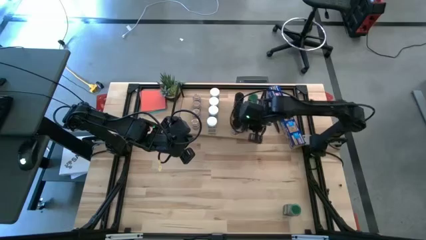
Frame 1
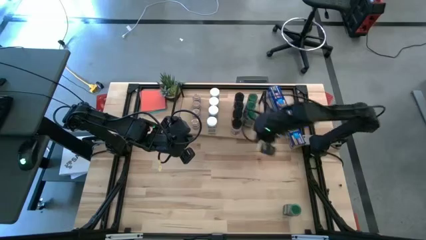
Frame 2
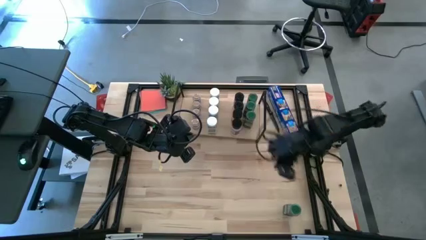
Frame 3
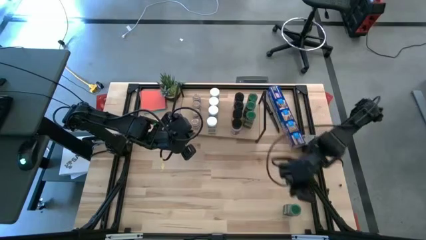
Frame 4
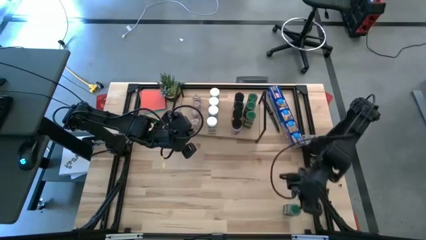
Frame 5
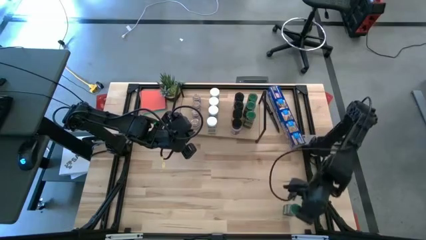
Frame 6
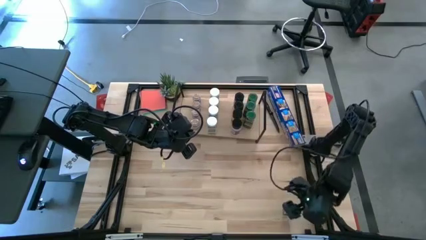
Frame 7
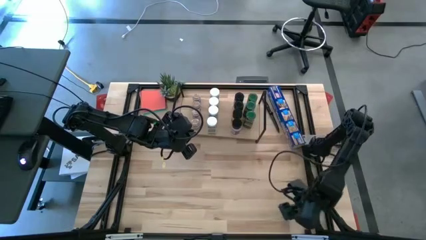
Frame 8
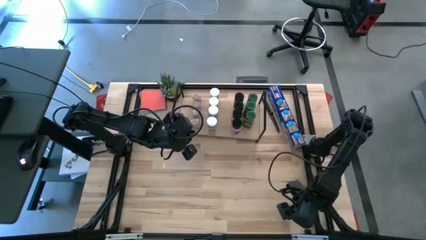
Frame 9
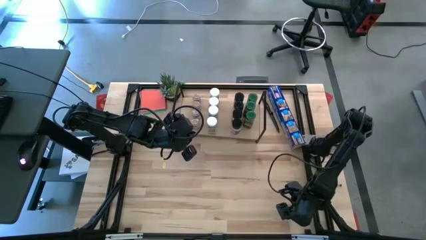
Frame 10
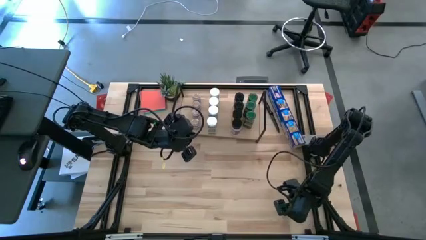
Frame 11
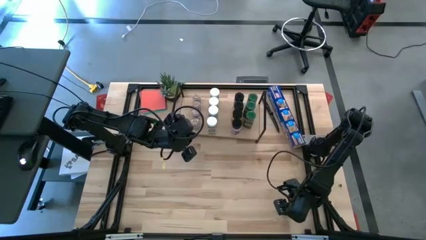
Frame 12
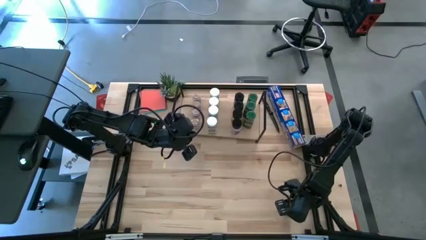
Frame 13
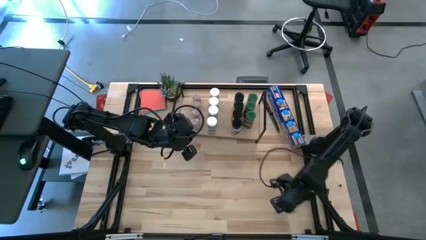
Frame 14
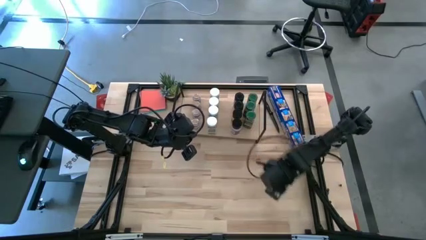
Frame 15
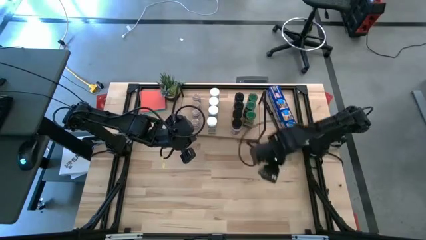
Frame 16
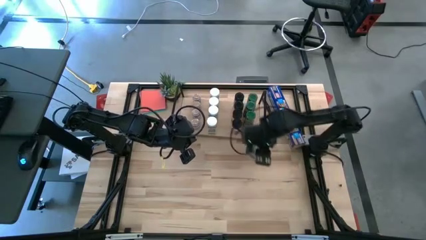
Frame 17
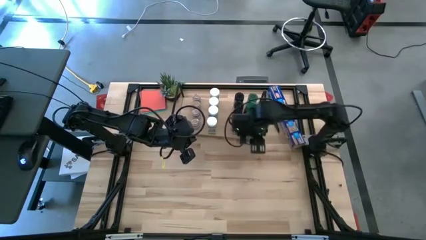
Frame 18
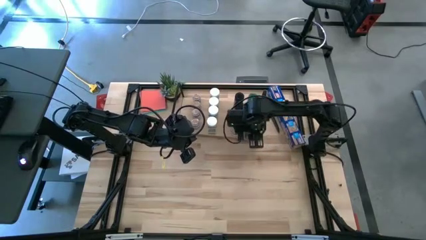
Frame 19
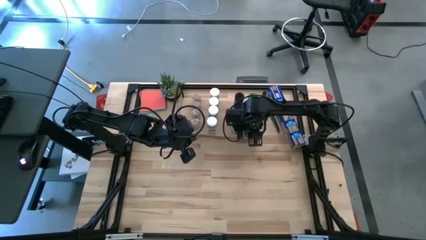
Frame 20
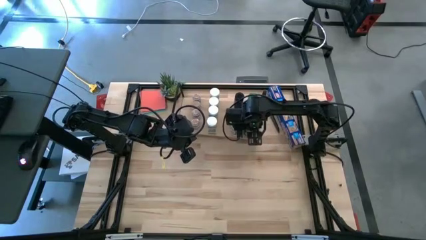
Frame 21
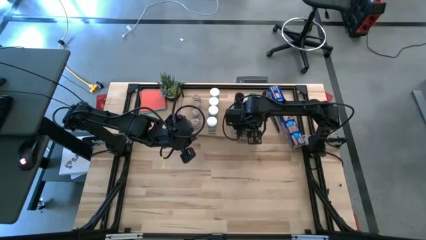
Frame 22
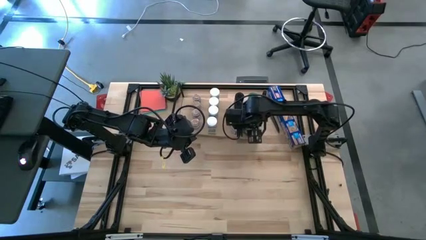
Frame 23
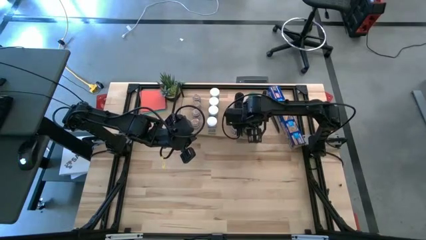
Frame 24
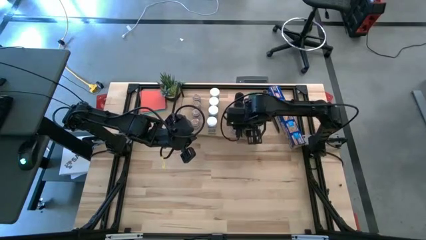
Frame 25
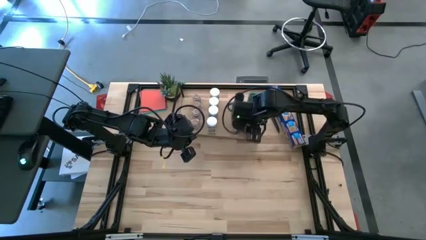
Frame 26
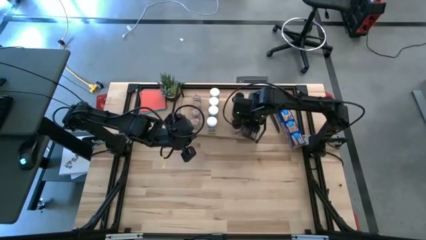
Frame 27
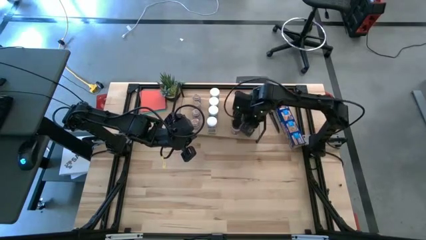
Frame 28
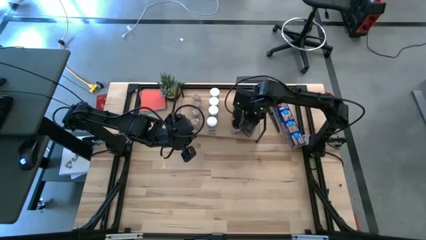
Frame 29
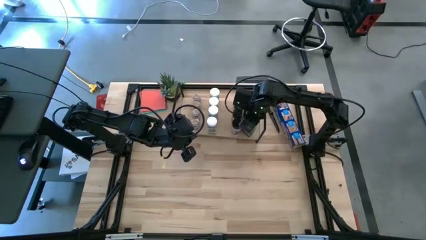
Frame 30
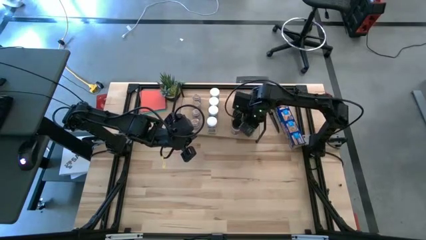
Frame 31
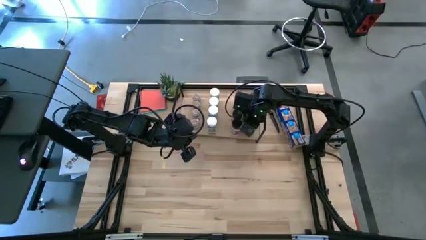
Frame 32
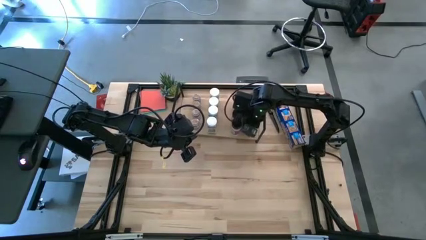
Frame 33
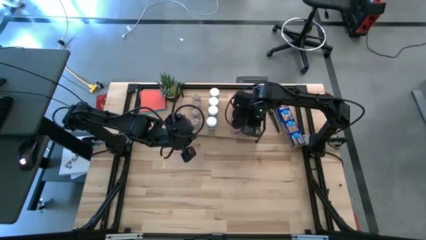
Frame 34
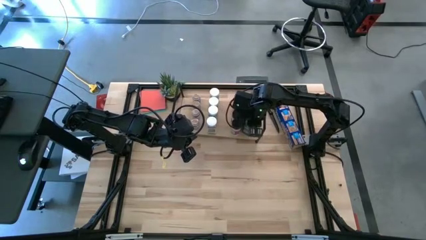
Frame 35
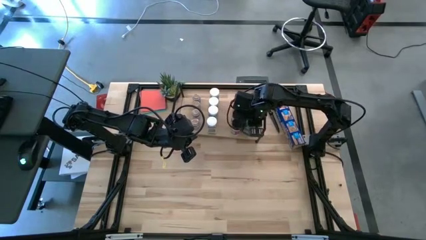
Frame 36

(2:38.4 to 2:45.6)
Task: Shelf spices
Put the green seasoning bottle on the shelf aligned with the other green seasoning bottles

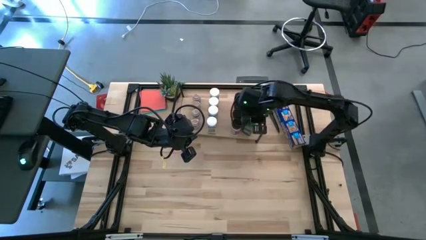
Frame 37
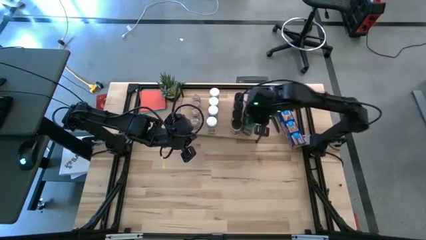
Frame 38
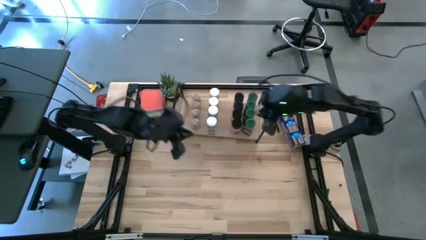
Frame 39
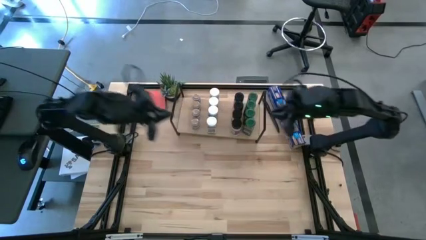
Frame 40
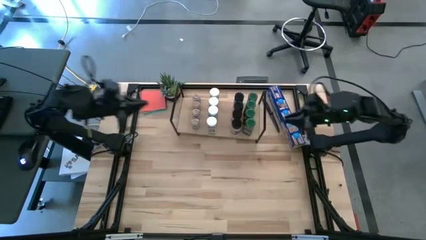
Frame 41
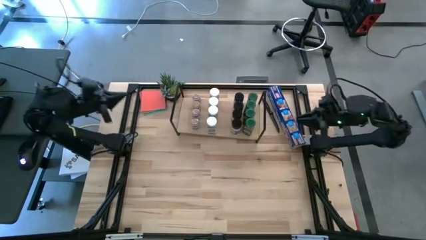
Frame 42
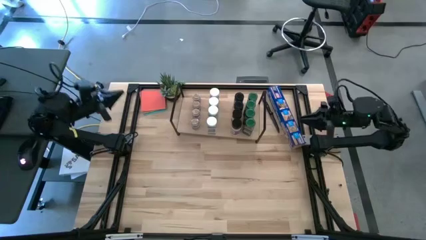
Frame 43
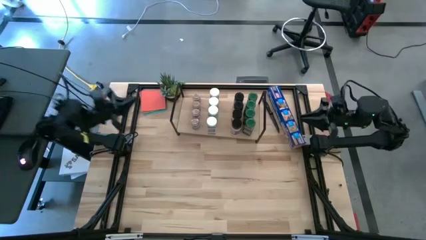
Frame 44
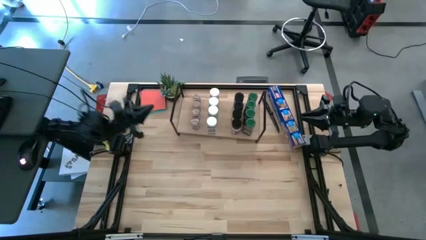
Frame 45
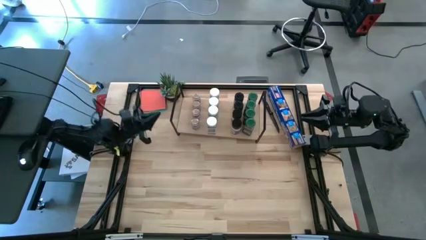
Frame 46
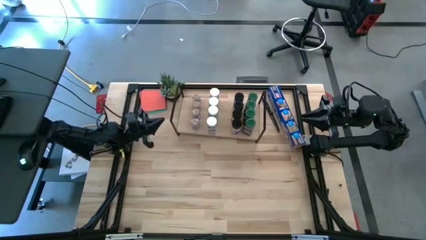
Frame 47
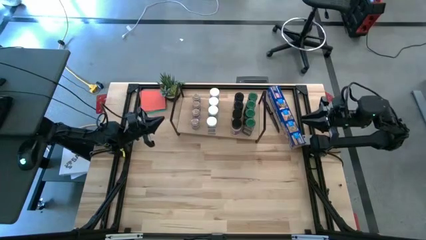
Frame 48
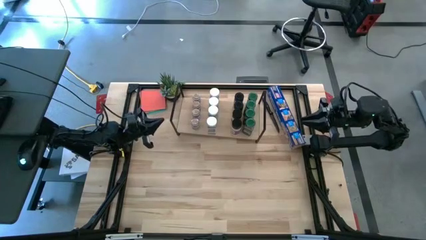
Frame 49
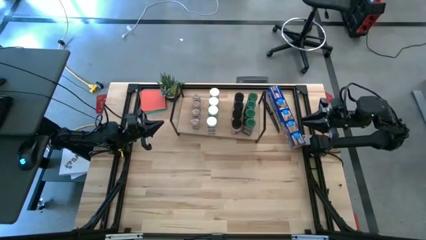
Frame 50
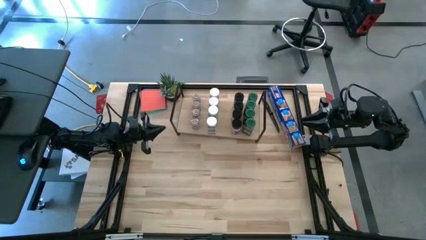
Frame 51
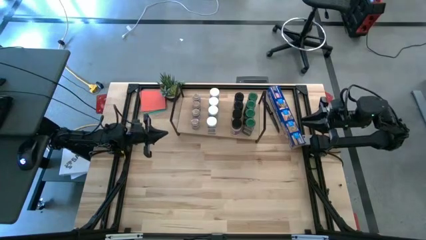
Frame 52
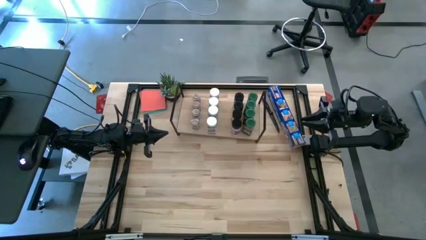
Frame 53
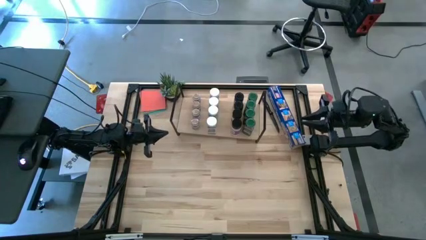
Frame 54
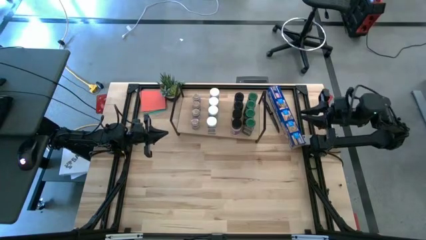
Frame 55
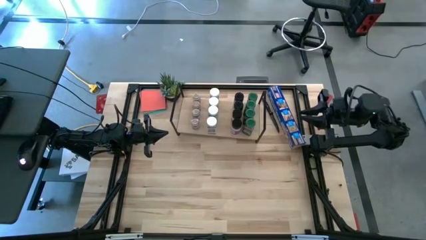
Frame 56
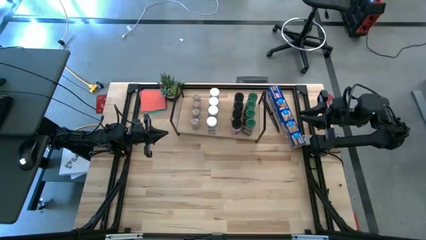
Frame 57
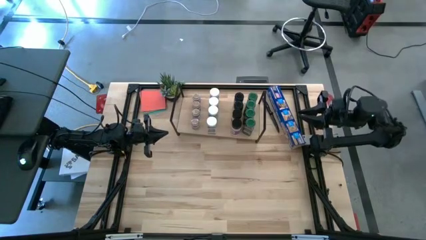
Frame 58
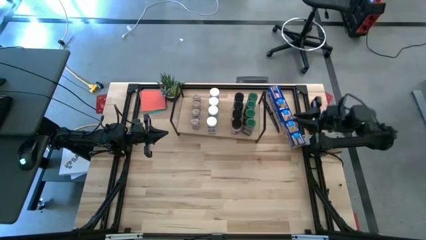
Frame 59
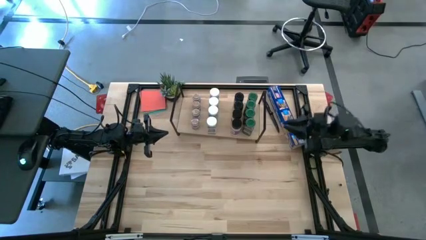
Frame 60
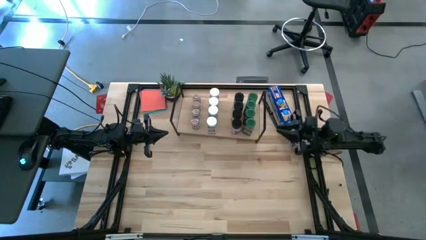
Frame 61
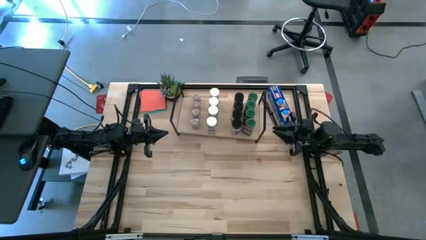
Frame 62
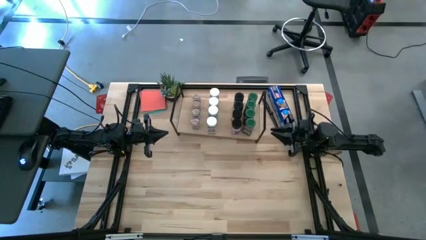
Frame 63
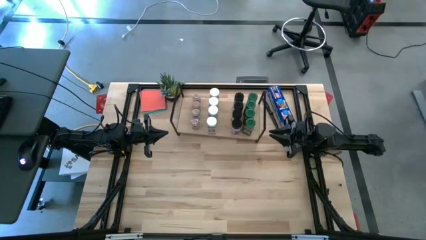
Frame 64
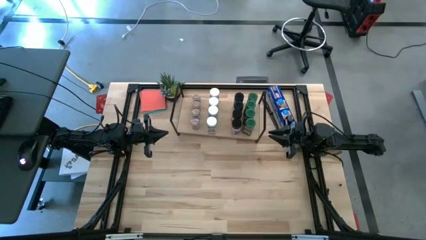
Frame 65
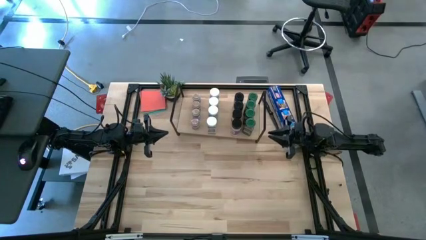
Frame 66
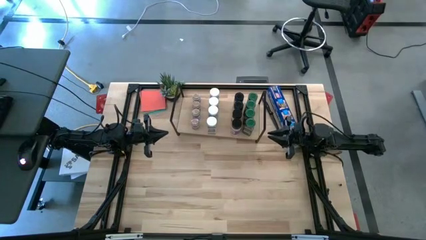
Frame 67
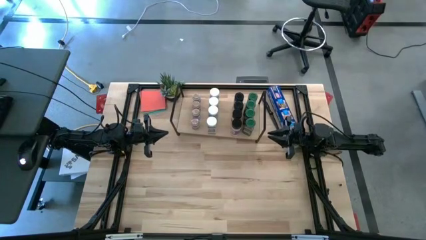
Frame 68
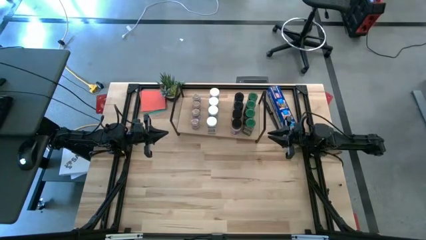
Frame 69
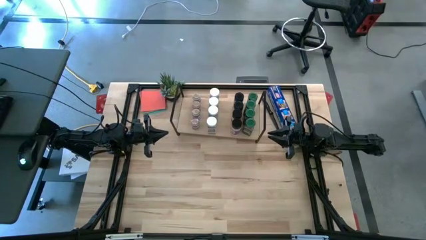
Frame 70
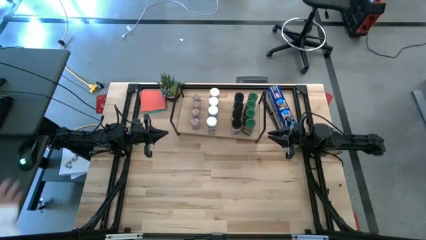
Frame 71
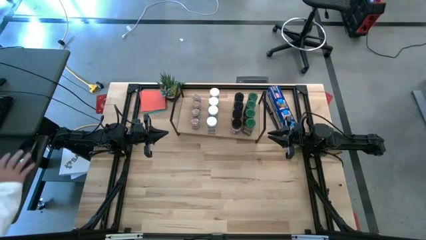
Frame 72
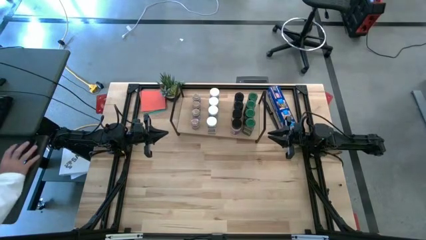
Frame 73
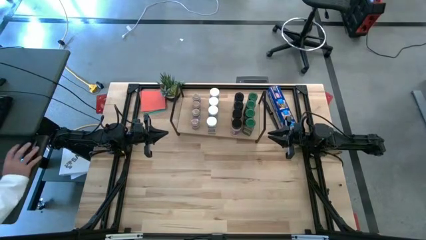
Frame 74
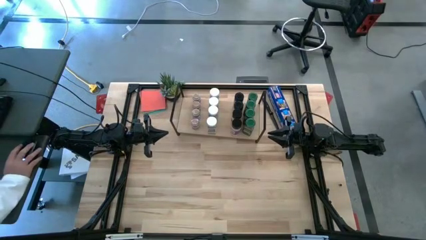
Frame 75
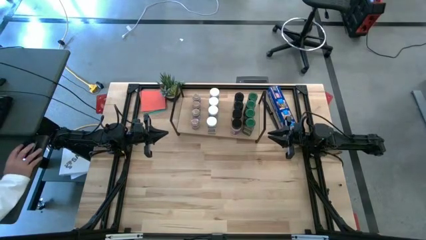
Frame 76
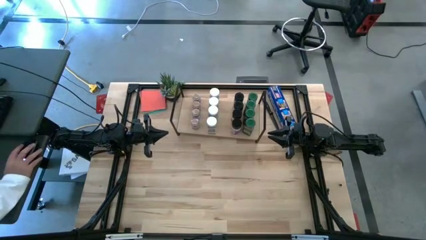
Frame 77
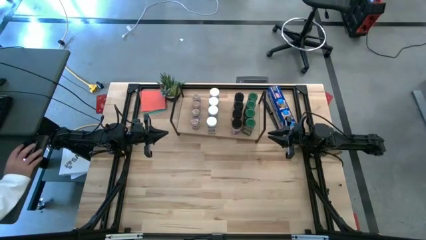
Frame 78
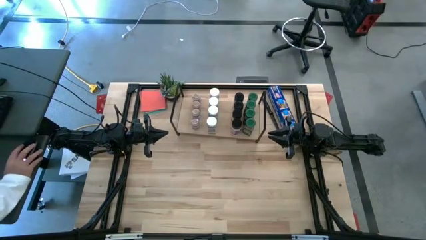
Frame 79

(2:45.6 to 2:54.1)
Return to Home Position
